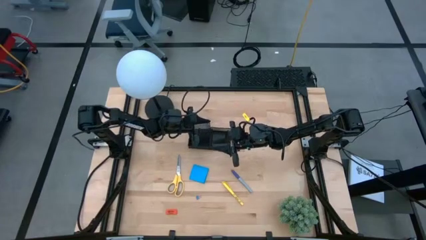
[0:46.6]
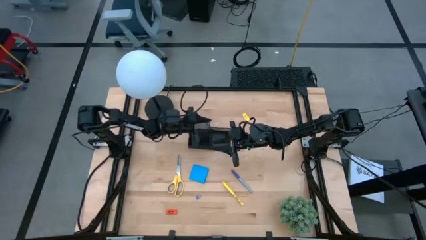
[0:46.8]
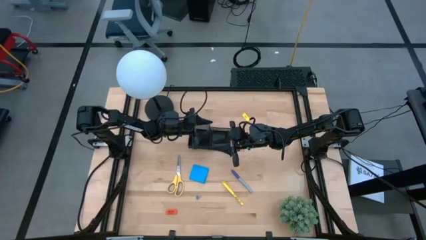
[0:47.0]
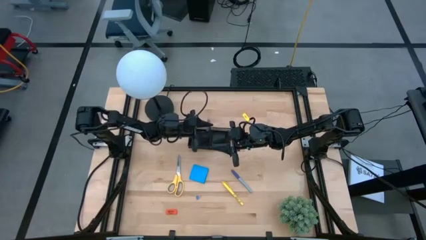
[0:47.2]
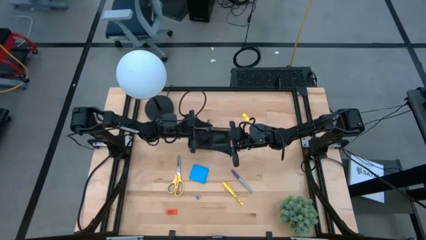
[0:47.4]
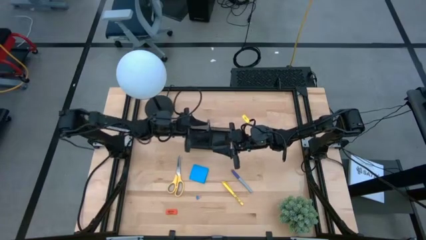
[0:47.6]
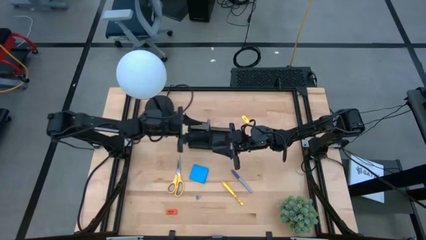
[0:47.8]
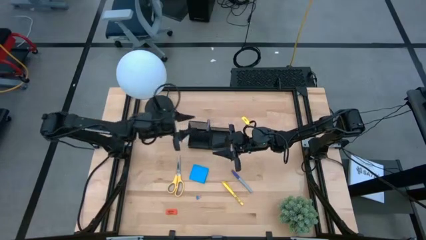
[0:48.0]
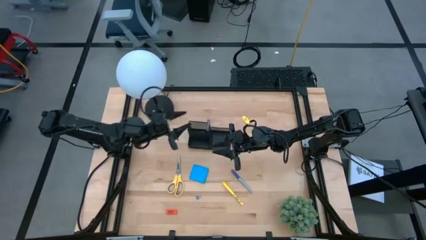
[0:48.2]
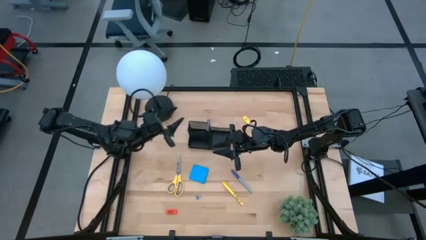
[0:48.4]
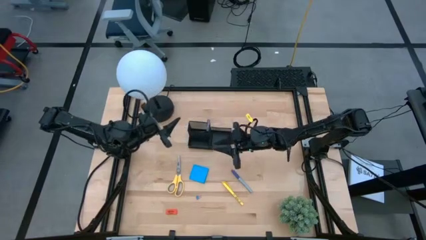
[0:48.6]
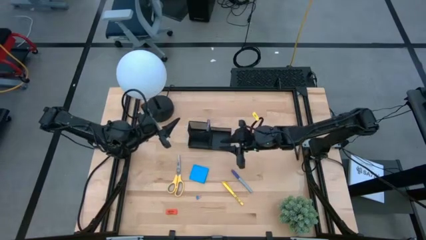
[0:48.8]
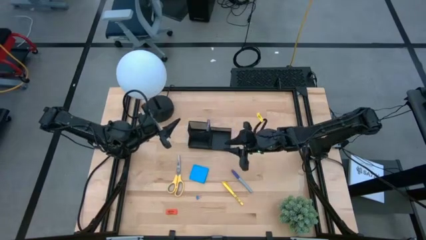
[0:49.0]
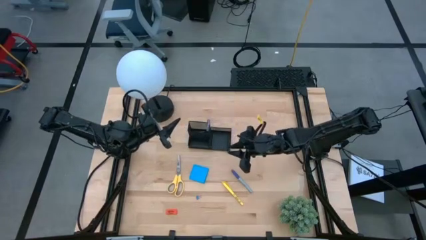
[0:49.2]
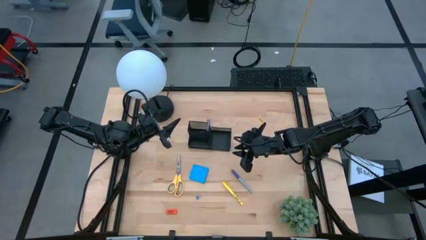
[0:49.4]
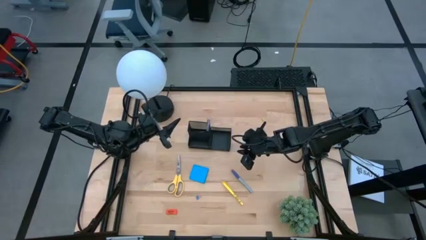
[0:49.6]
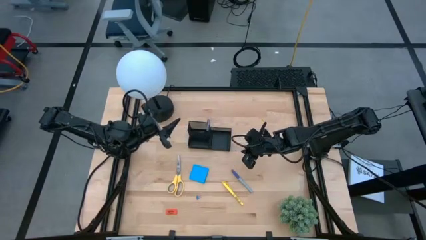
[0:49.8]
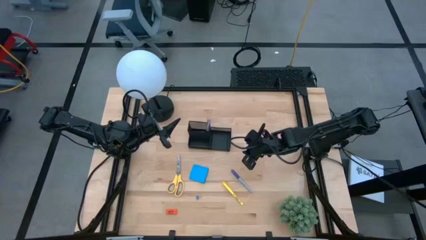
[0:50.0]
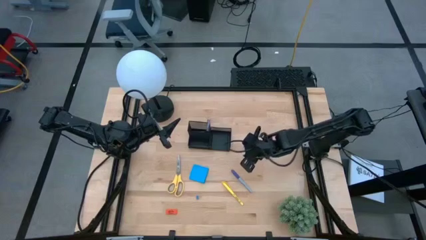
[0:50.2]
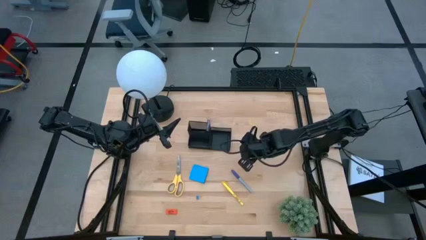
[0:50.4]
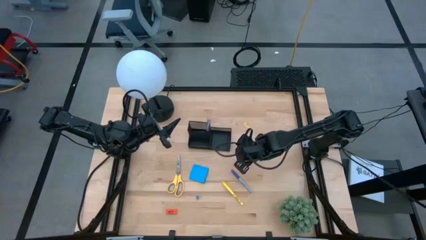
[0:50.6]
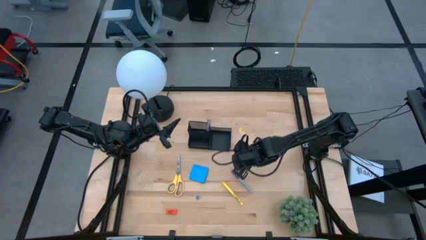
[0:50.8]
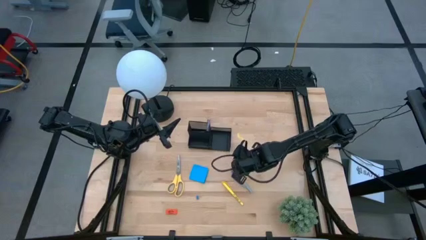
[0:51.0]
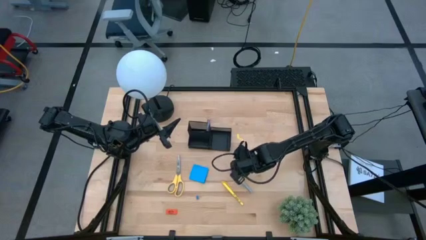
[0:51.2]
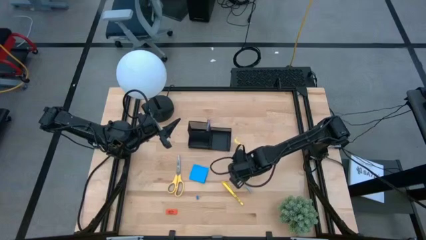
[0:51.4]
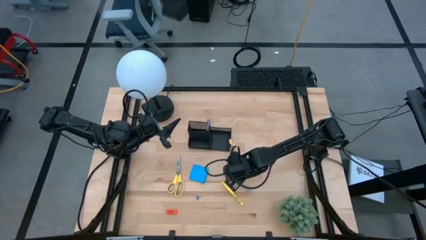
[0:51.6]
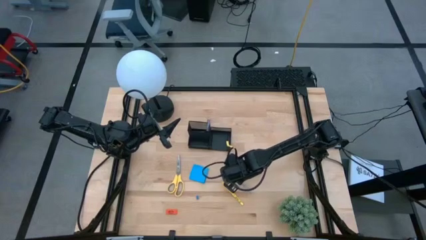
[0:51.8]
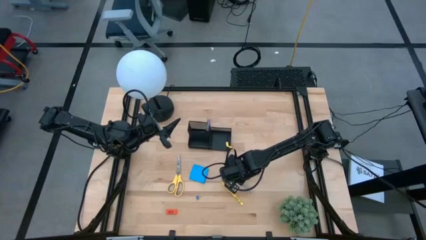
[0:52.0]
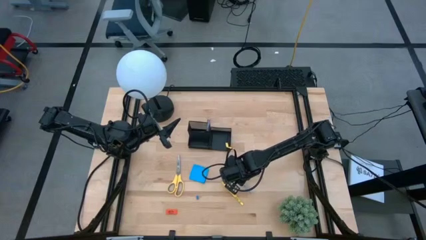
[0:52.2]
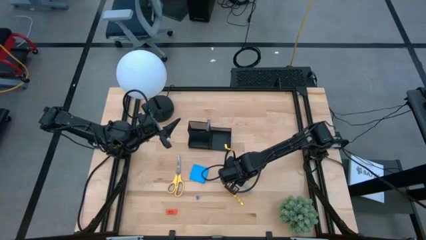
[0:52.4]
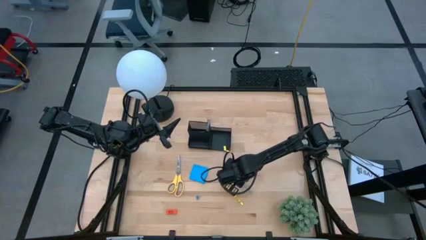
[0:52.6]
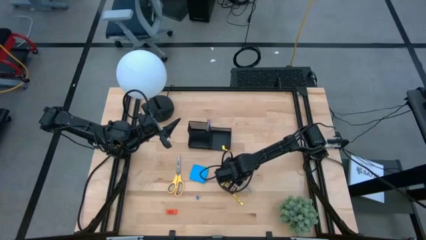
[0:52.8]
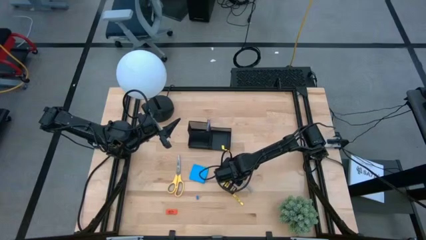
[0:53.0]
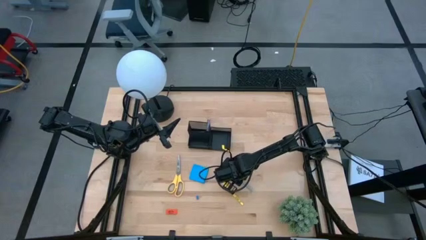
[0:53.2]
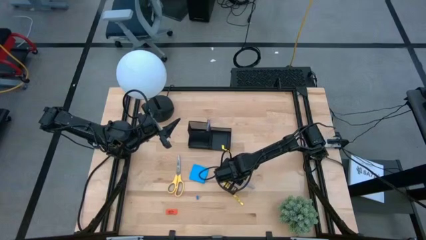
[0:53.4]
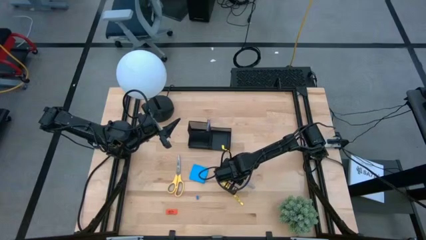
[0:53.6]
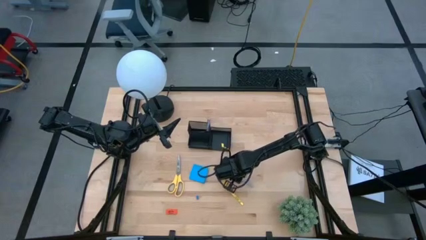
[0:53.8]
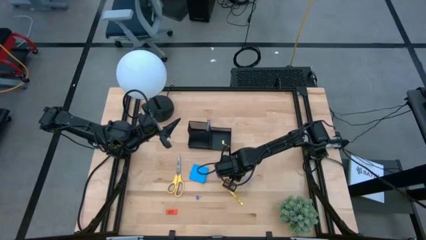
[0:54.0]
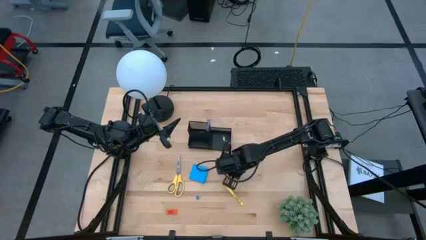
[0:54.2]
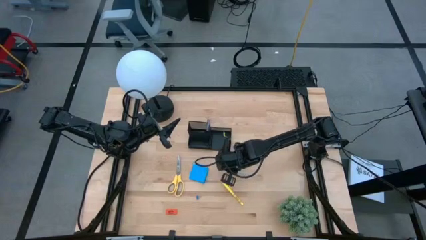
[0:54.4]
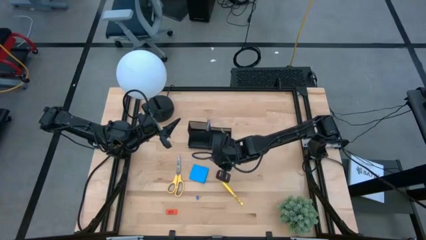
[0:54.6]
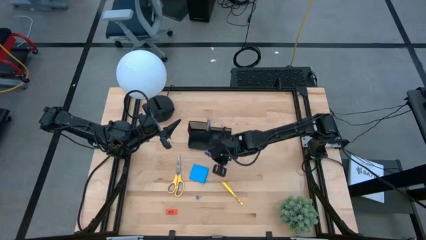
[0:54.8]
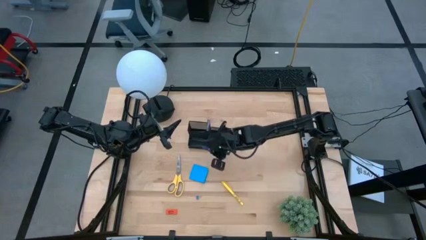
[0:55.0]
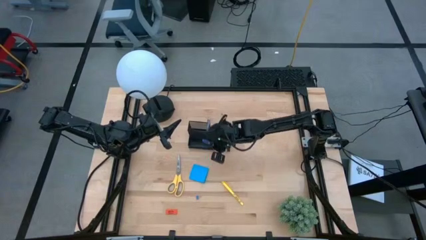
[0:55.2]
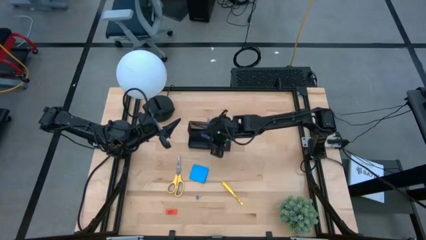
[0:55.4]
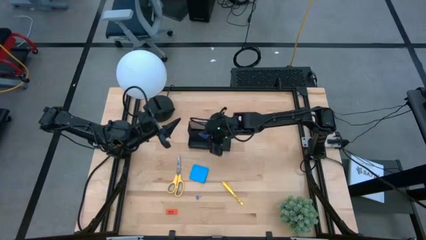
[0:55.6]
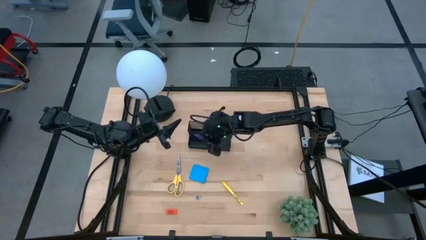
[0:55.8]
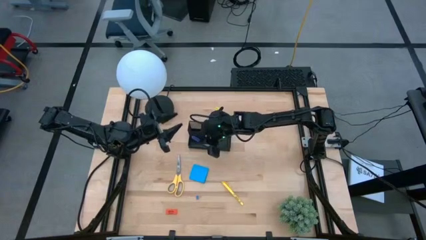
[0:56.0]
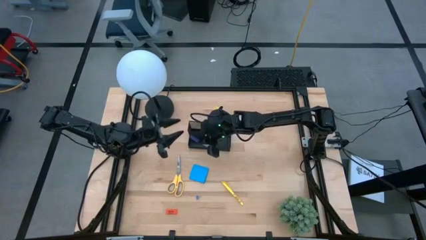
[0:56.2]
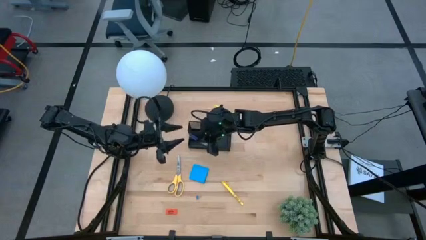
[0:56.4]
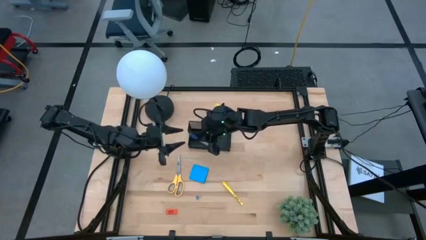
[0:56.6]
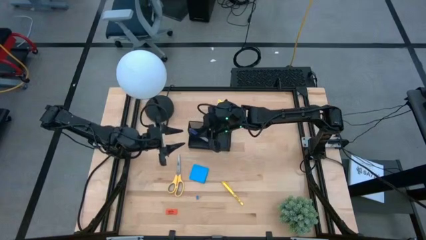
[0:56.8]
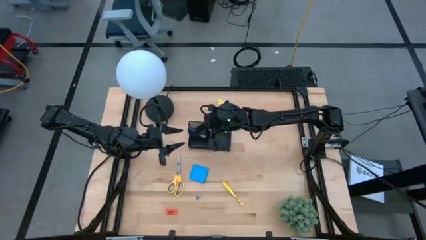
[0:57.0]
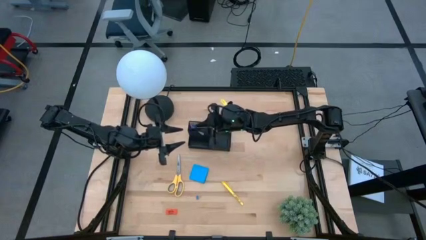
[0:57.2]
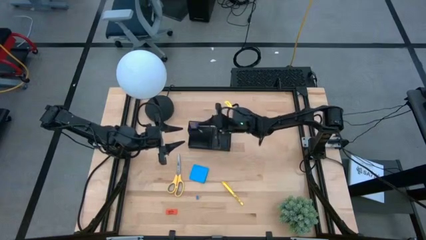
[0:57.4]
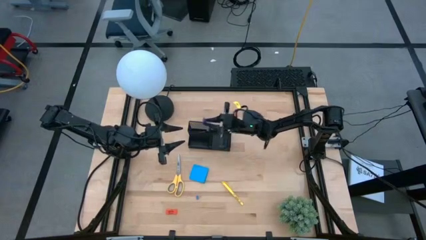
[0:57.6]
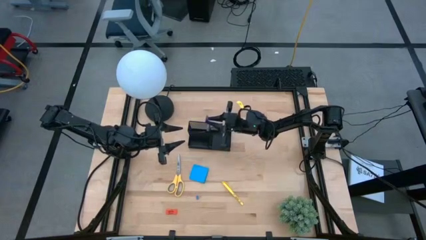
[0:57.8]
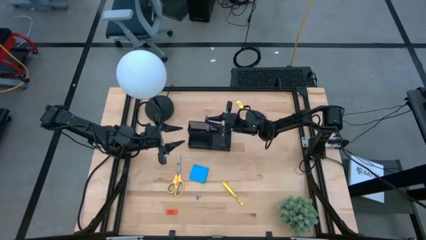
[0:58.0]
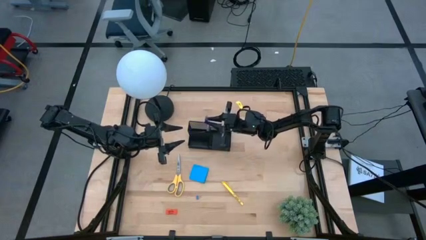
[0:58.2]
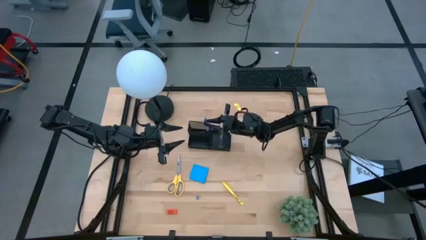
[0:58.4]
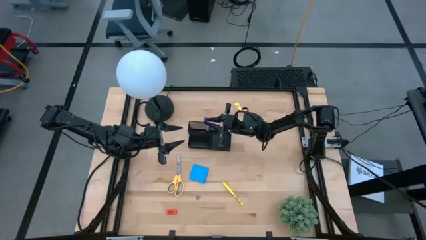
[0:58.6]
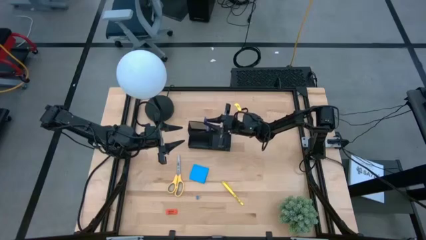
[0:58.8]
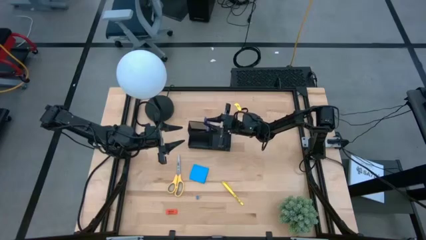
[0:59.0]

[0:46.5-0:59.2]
Task: Pick and place office supplies into organizer
Put the blue pen into the black mesh desk organizer
